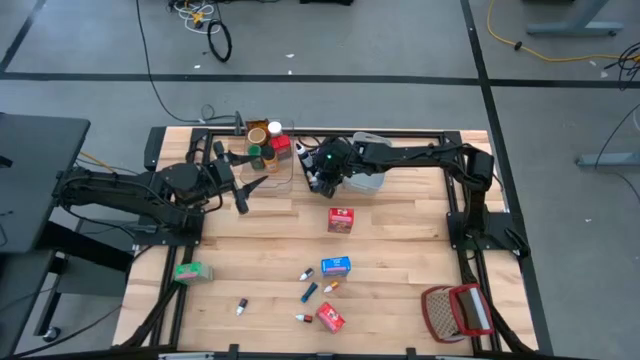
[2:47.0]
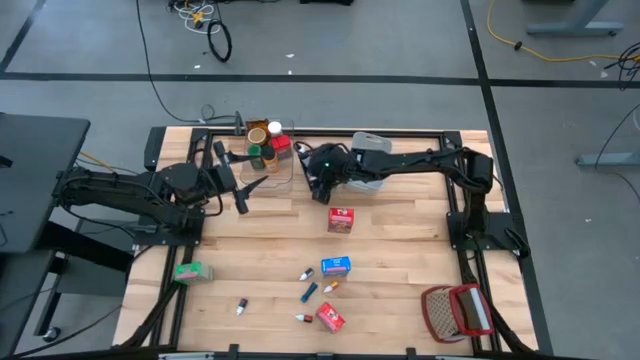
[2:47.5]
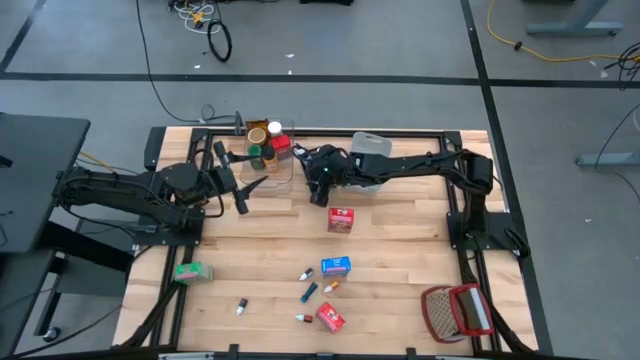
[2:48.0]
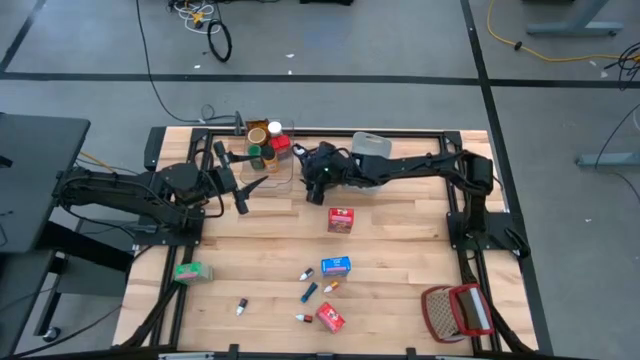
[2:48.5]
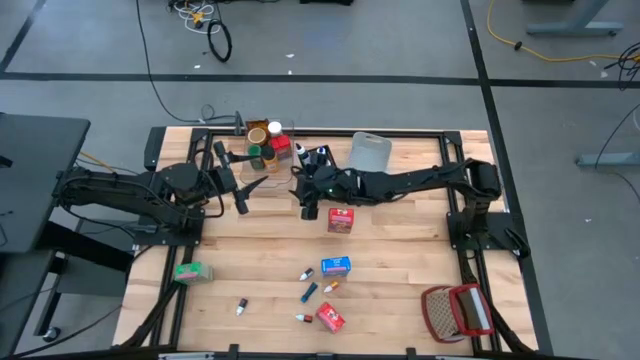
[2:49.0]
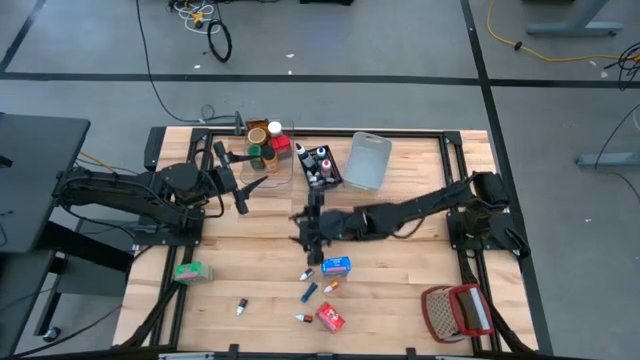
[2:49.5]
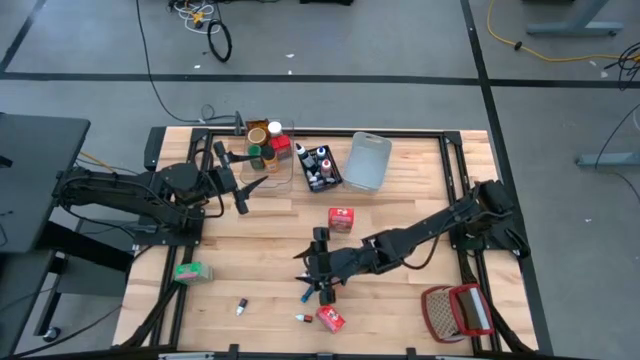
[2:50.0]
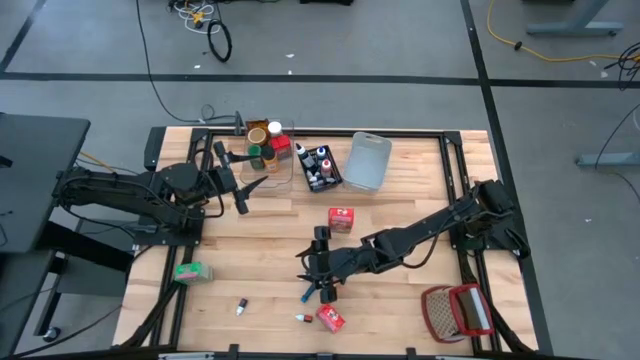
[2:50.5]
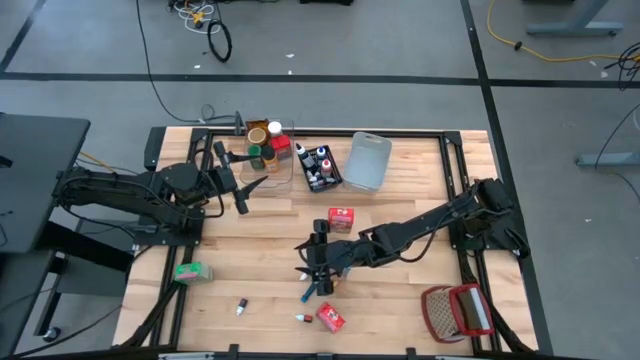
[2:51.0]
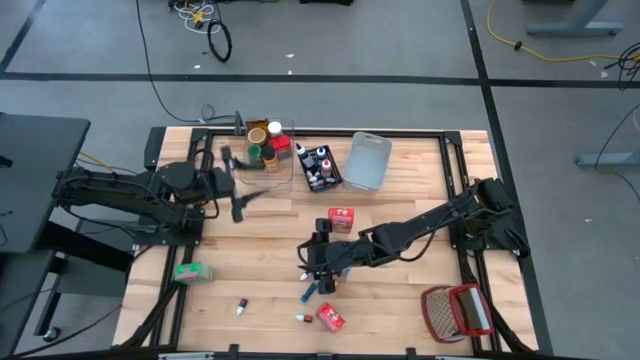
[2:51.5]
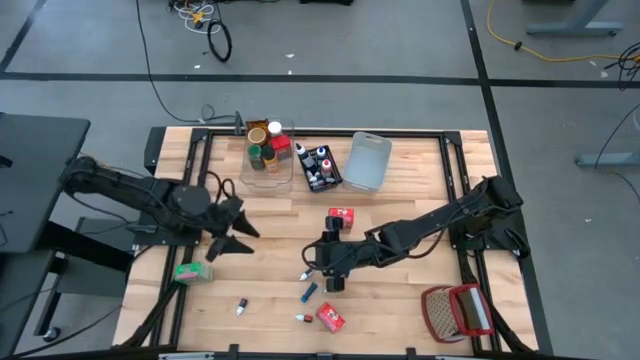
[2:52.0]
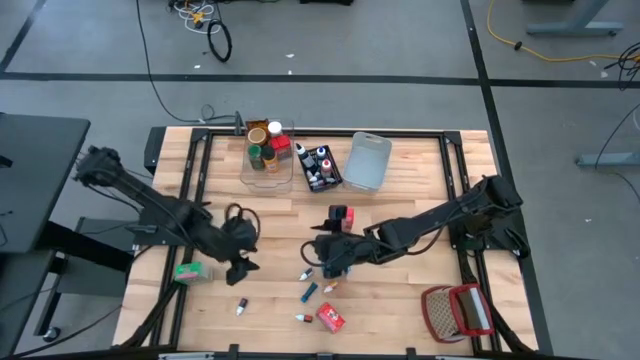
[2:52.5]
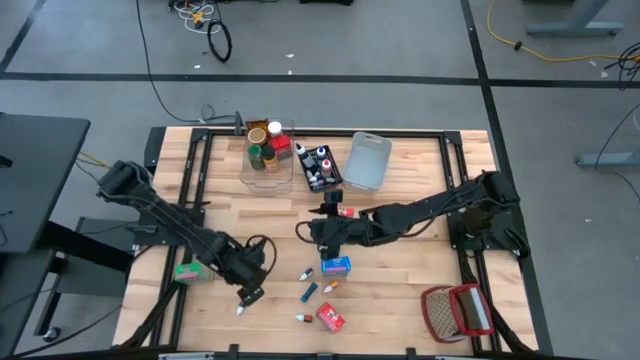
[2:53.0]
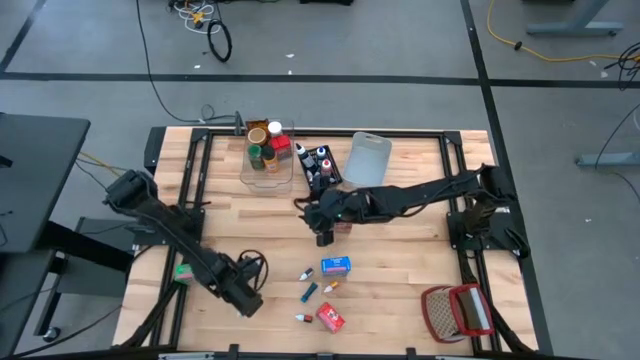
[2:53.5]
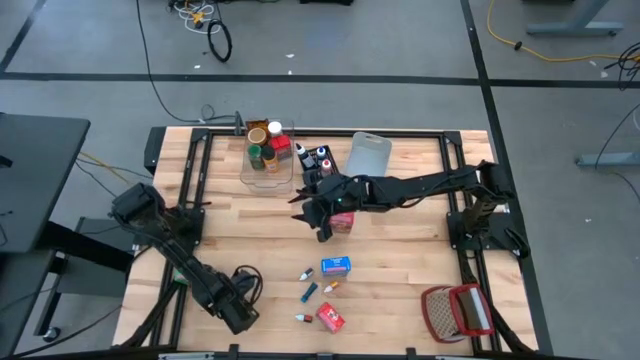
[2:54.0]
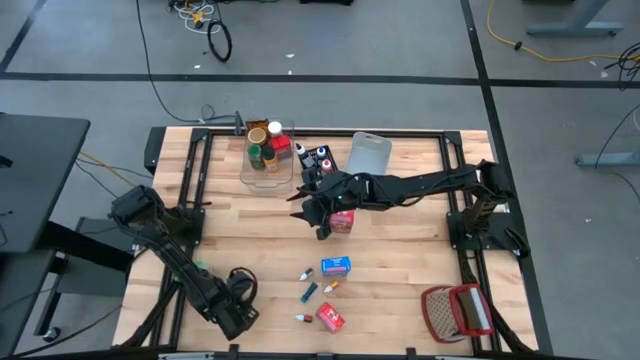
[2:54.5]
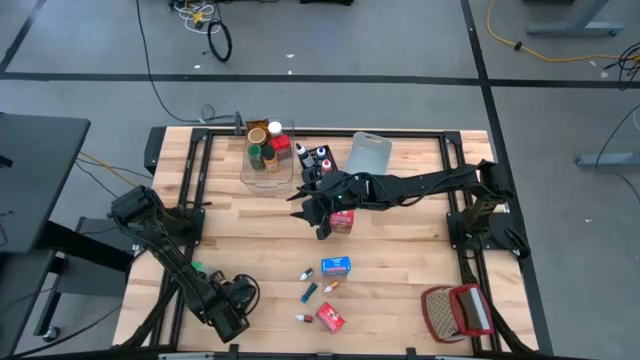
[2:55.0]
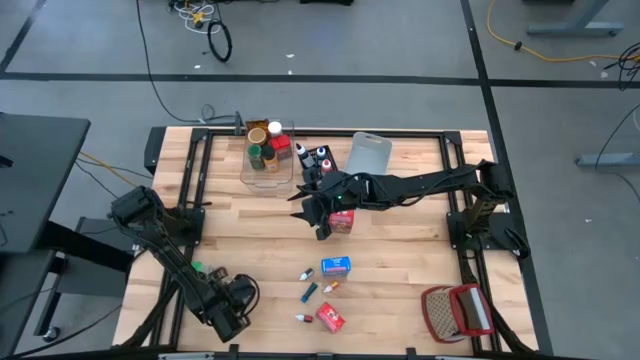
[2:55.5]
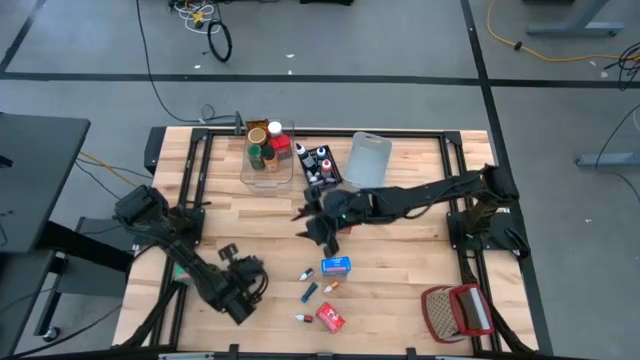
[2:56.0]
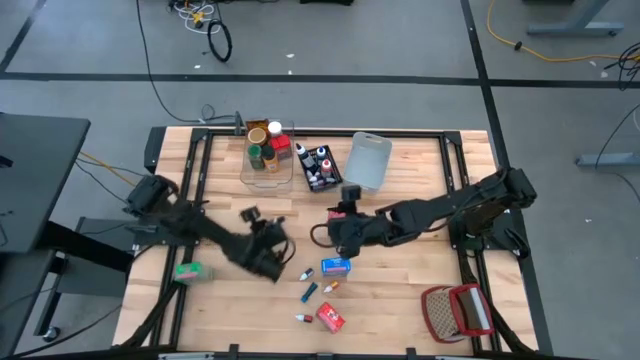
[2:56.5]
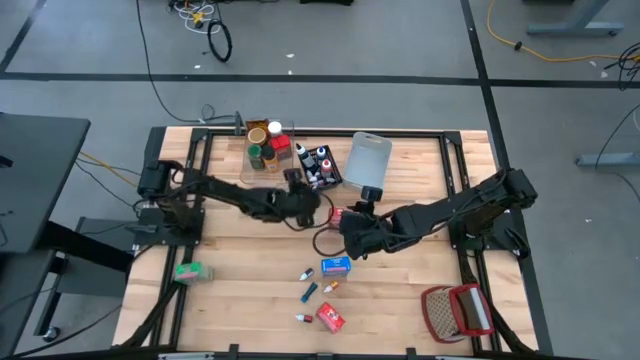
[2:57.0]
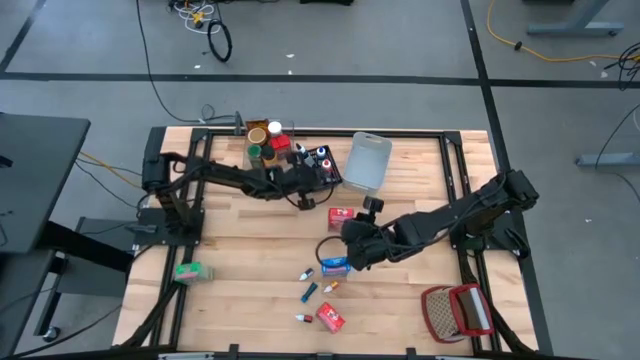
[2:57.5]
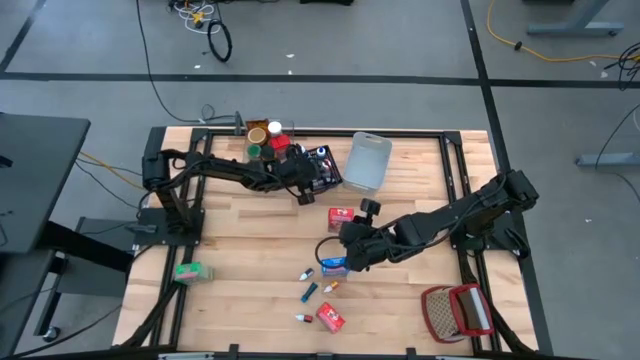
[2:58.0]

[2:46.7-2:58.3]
Task: Pick & Place Kitchen Items
Put the violet food coloring bottle into the black bin

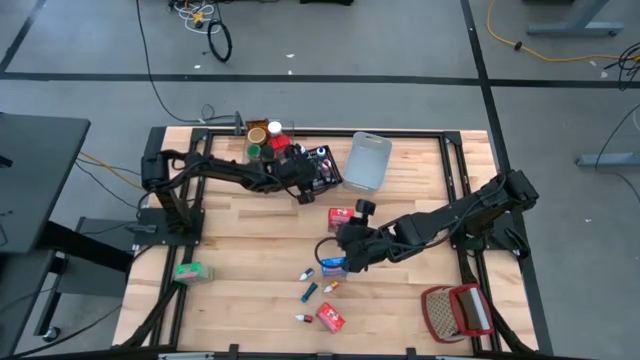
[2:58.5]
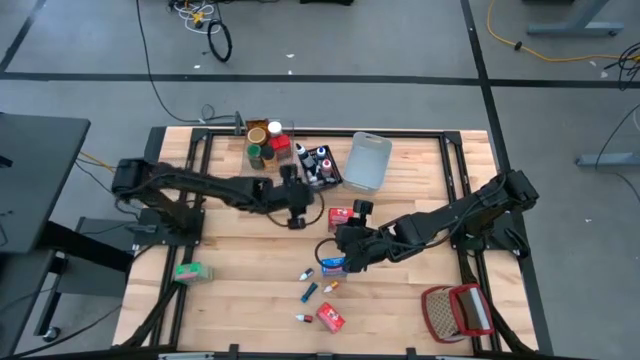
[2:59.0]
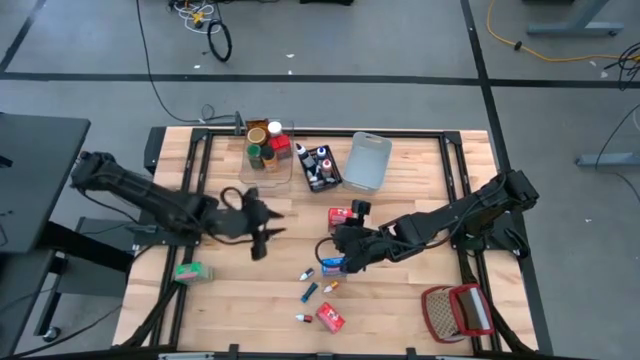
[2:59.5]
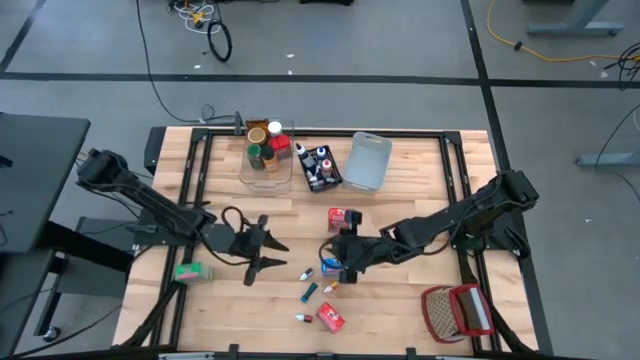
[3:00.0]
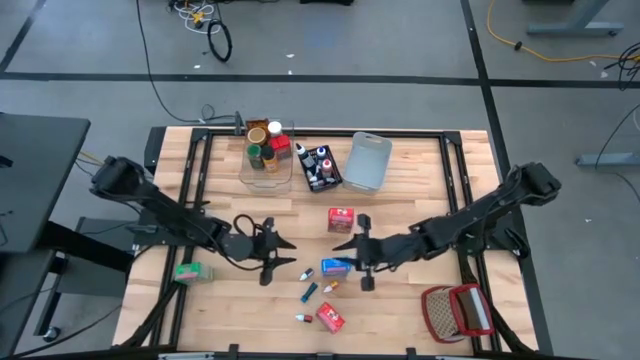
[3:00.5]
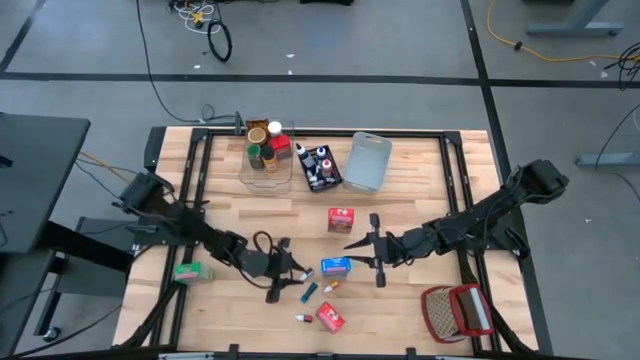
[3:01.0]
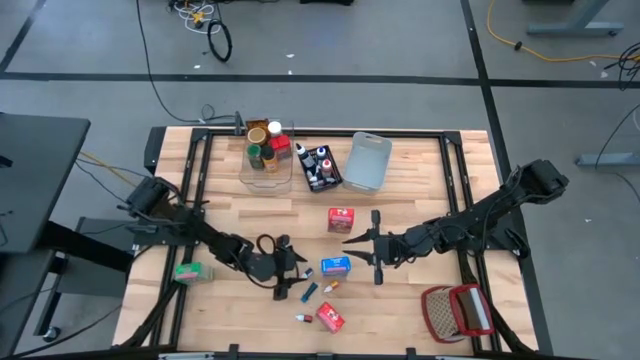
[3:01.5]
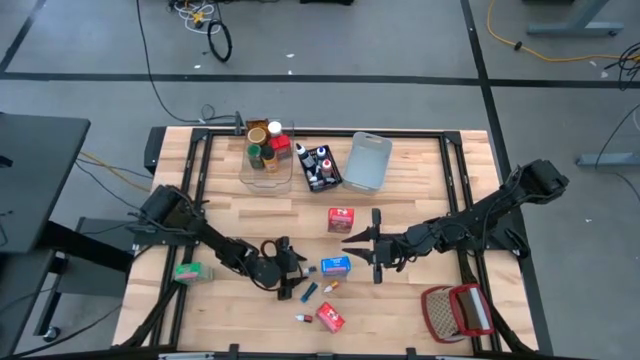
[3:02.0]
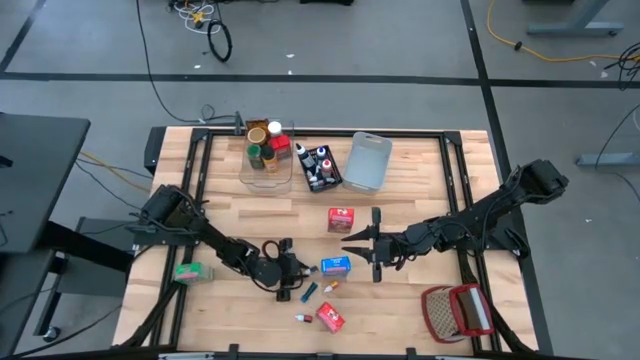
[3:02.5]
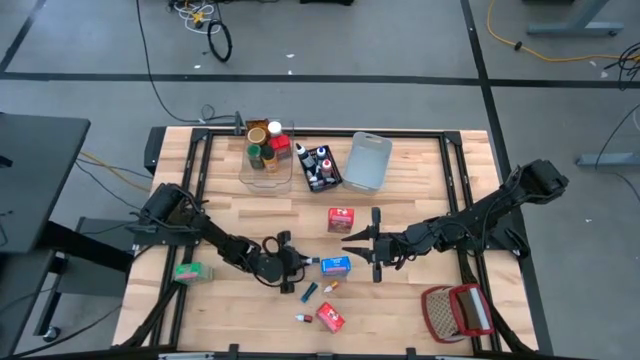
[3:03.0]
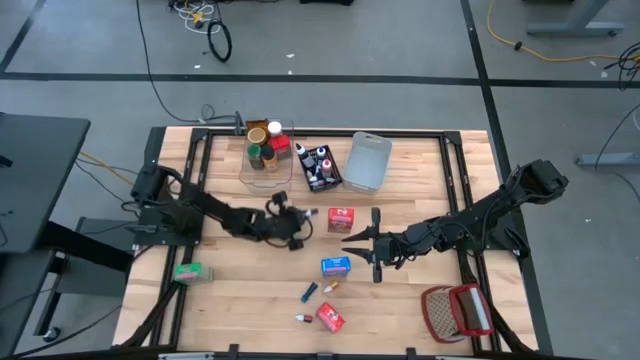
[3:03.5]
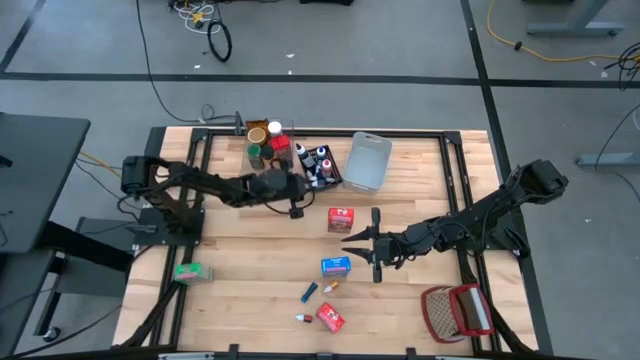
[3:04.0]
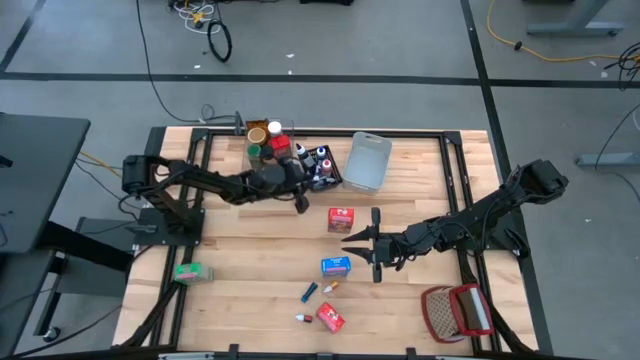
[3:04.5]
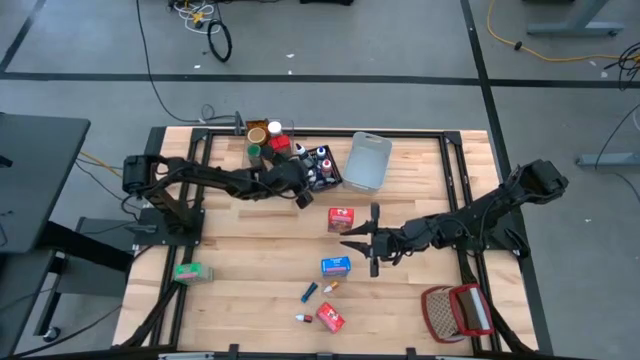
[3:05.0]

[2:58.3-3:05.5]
Put the black food coloring bottle into the black bin

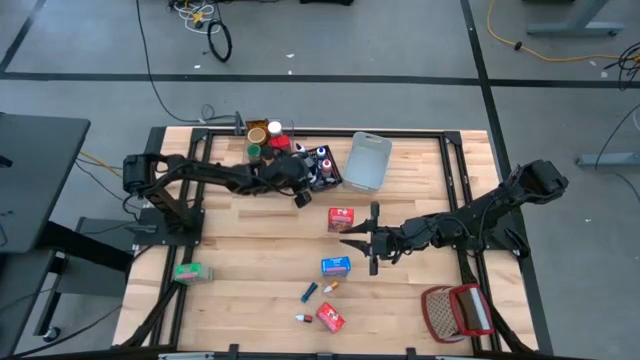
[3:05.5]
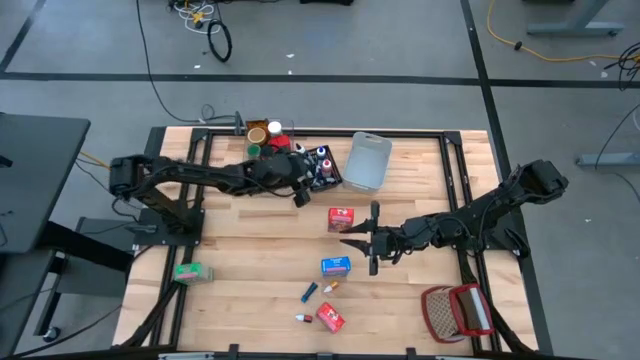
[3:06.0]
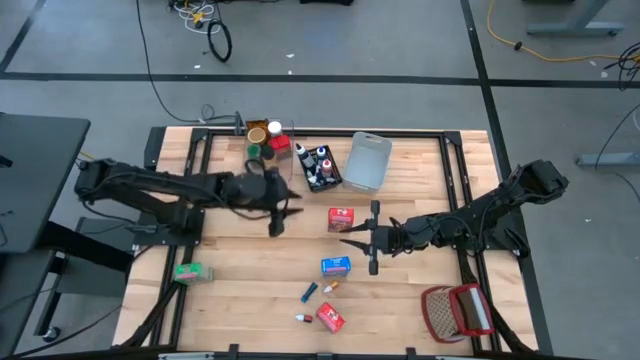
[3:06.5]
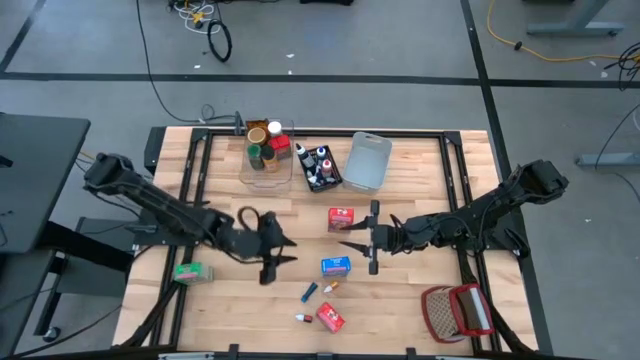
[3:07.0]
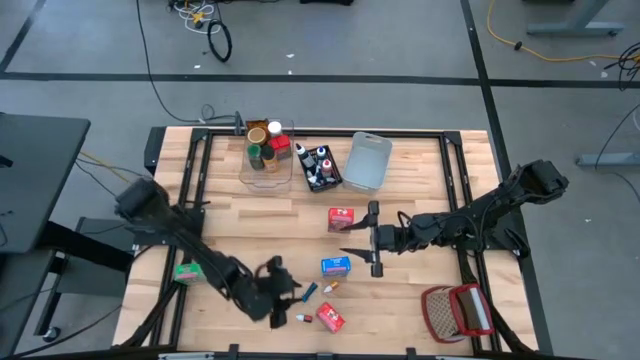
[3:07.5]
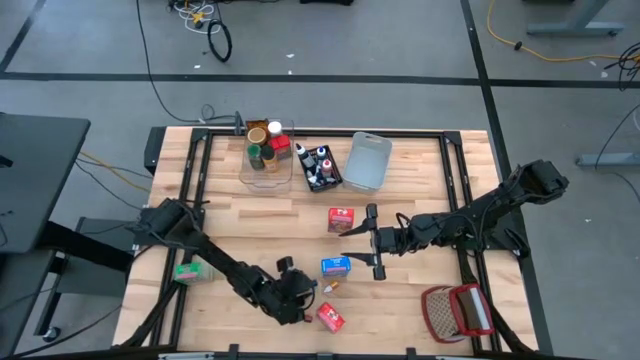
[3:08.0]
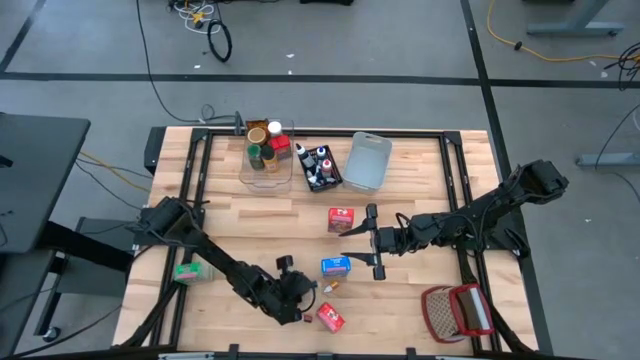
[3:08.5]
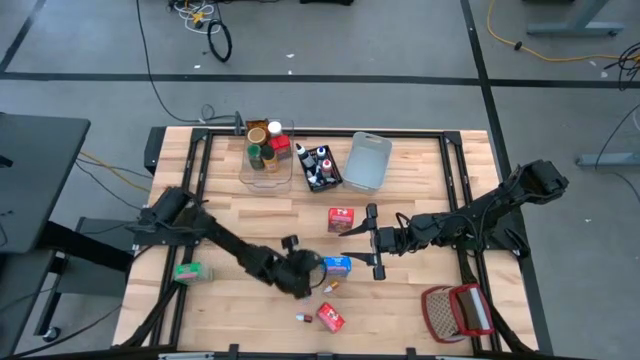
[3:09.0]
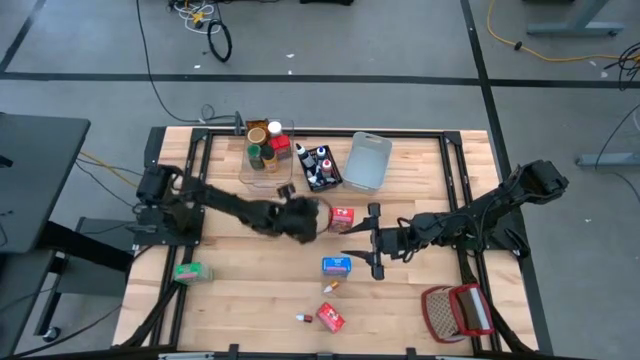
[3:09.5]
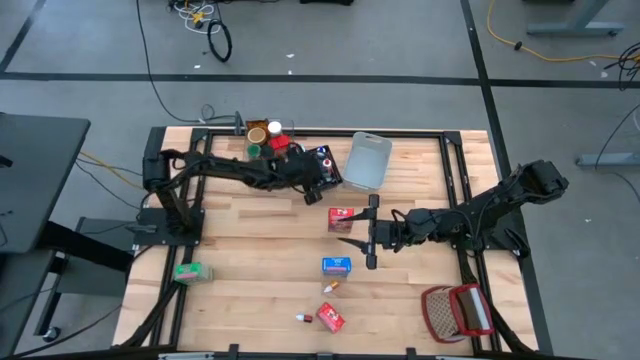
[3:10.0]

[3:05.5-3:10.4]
Put the small blue food coloring bottle into the black bin
